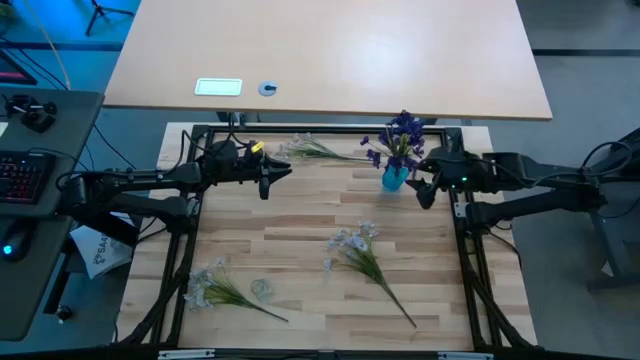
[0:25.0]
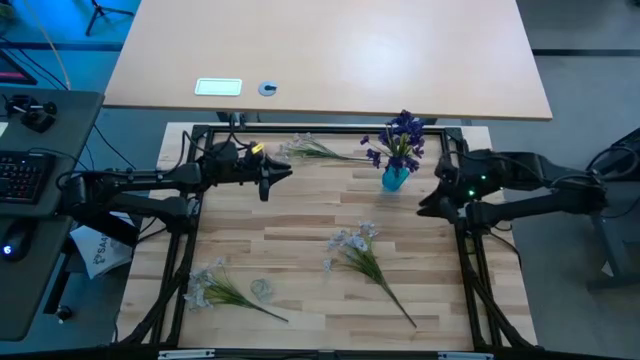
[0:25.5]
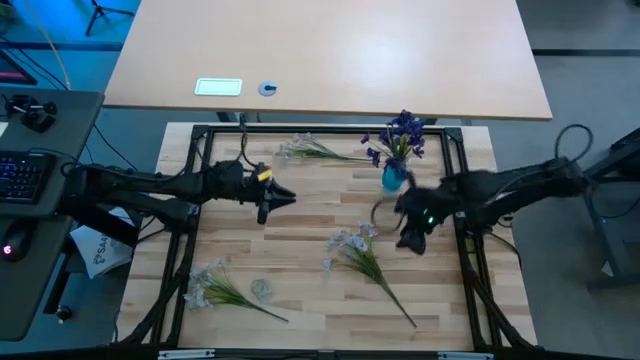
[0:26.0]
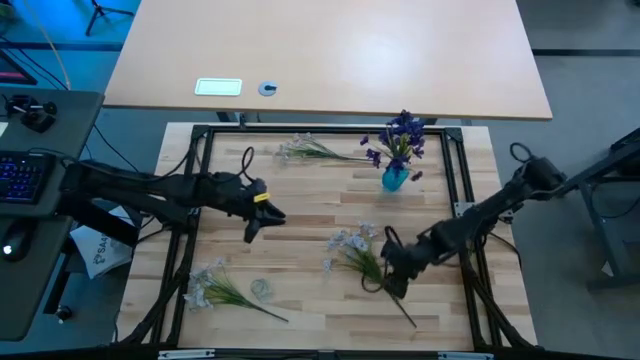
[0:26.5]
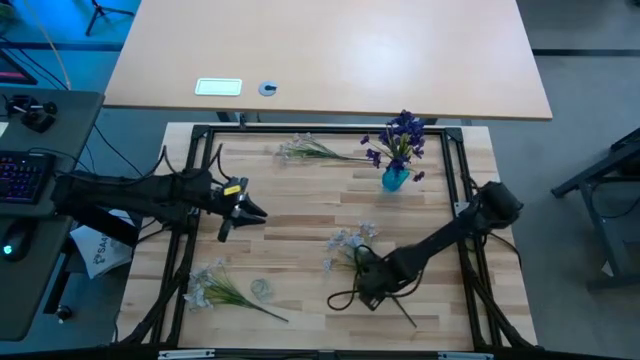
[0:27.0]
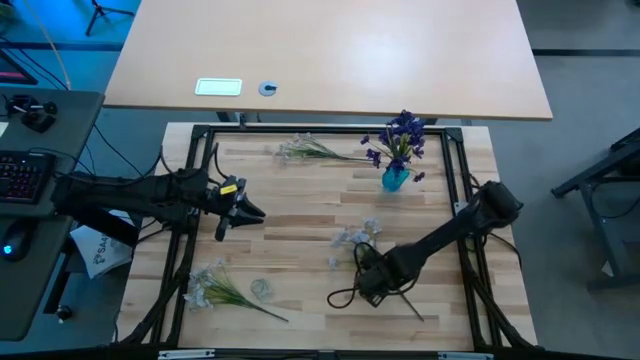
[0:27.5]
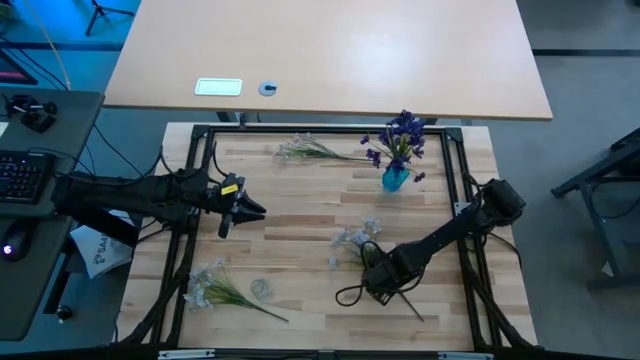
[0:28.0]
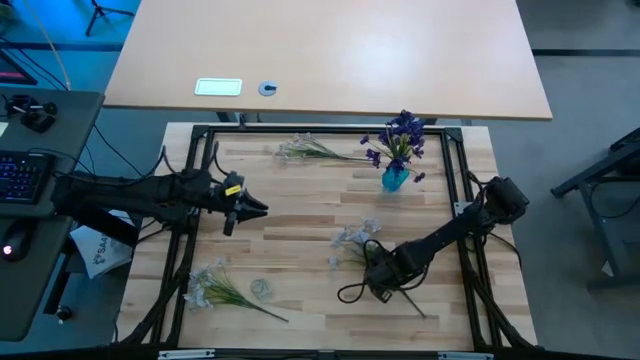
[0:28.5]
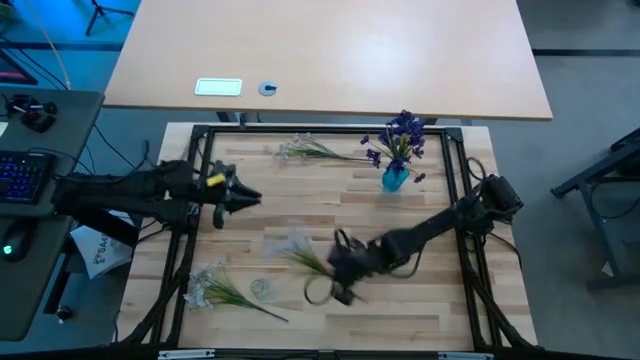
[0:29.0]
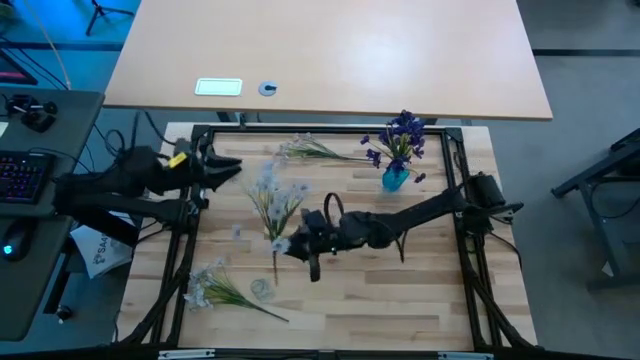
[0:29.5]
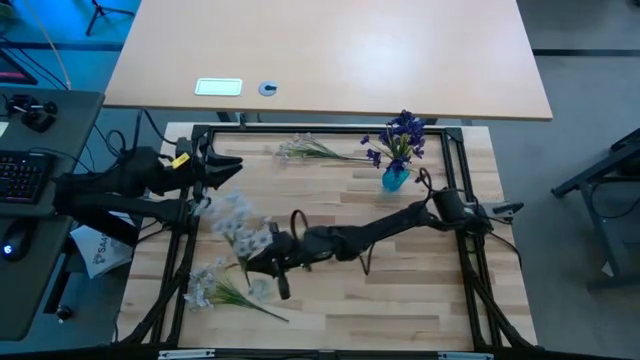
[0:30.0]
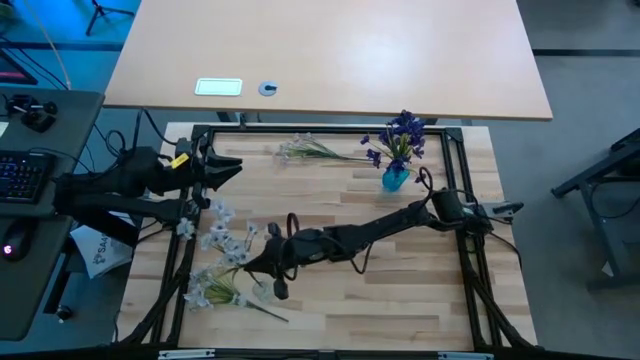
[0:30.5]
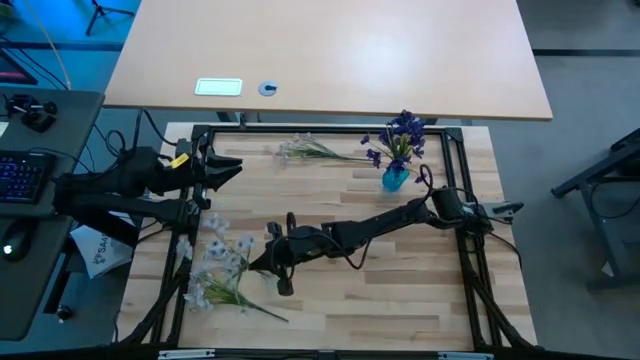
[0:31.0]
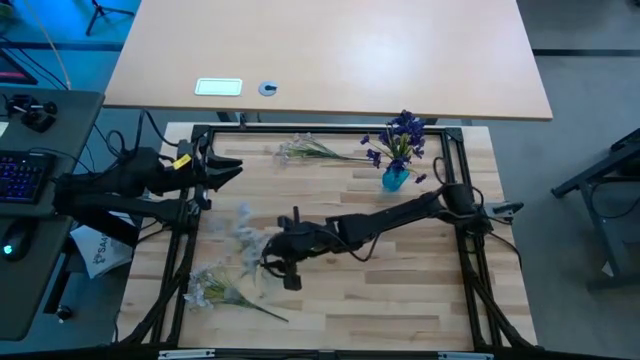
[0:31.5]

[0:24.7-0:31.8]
Task: Sort flowers into vase by color
Put the bottom right white flowers into the transparent vase

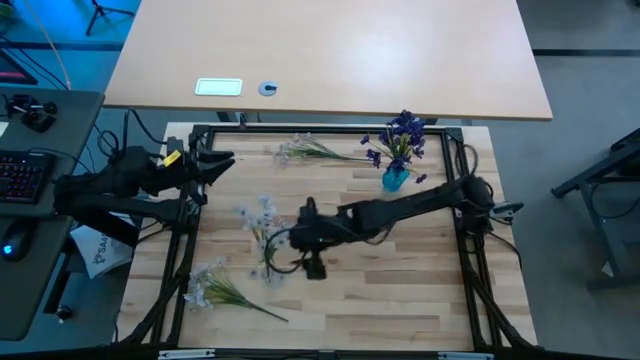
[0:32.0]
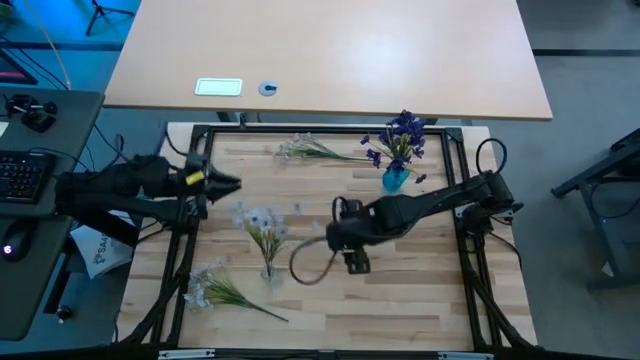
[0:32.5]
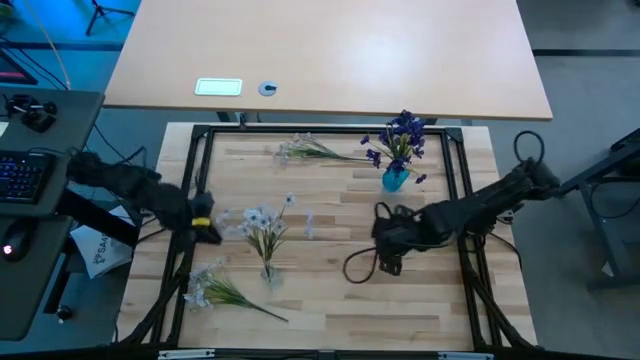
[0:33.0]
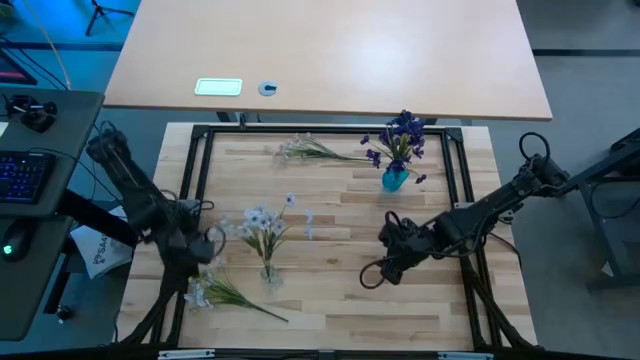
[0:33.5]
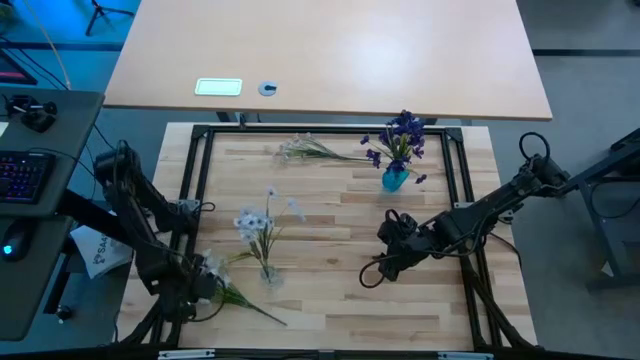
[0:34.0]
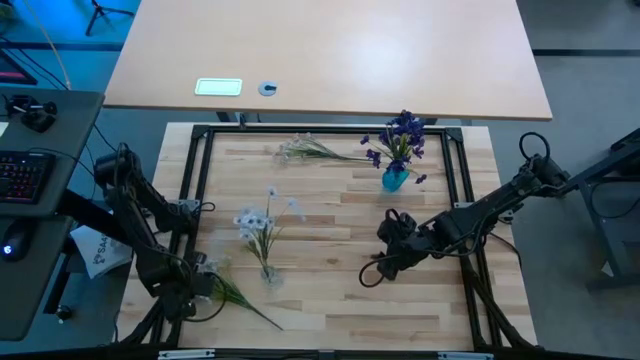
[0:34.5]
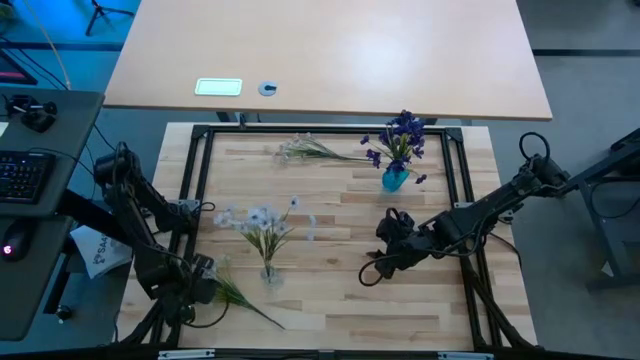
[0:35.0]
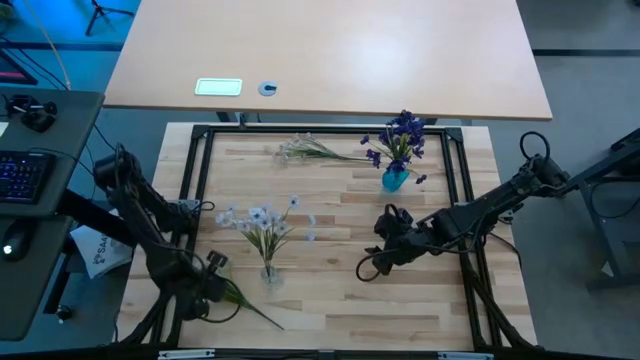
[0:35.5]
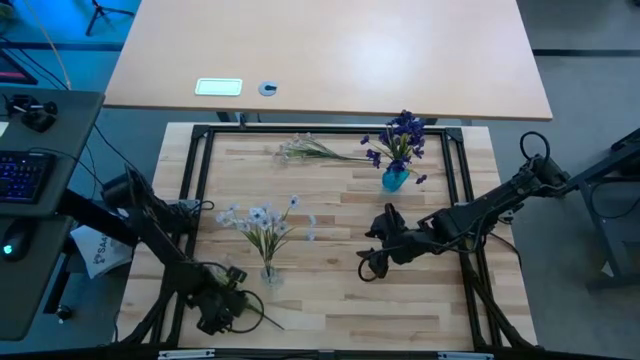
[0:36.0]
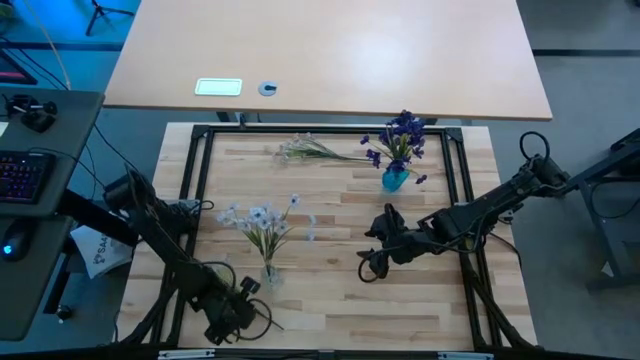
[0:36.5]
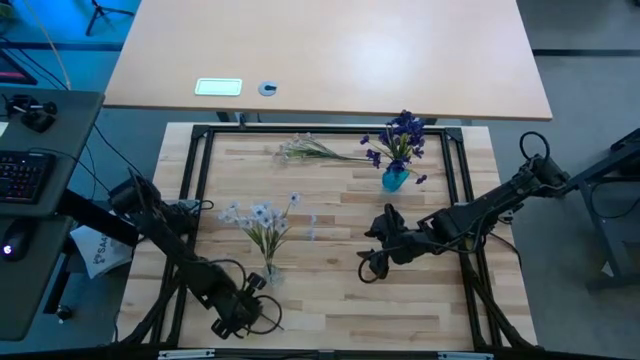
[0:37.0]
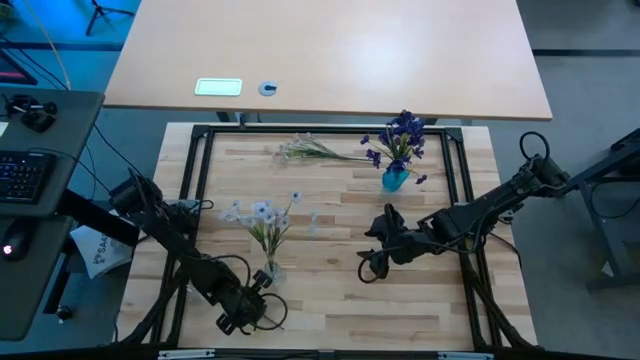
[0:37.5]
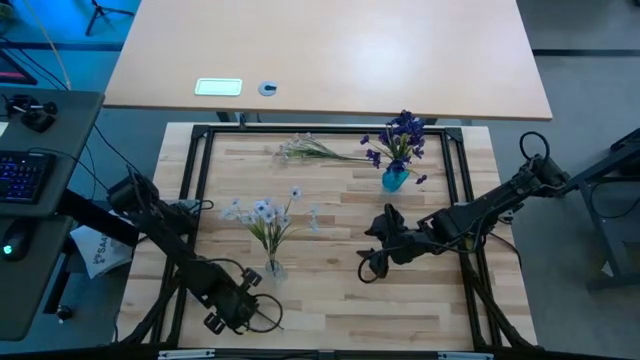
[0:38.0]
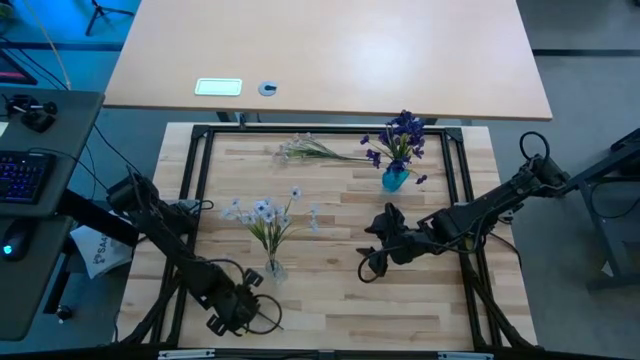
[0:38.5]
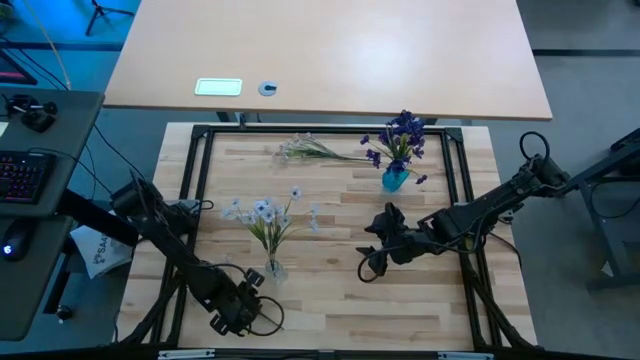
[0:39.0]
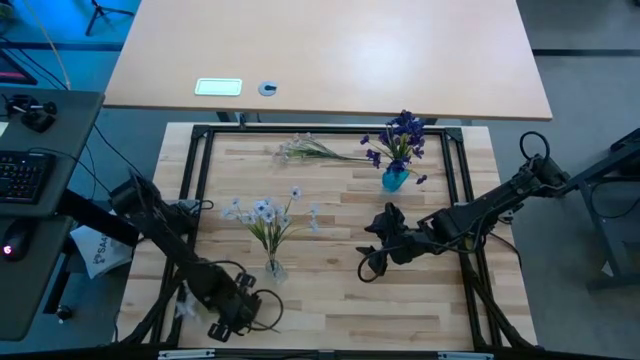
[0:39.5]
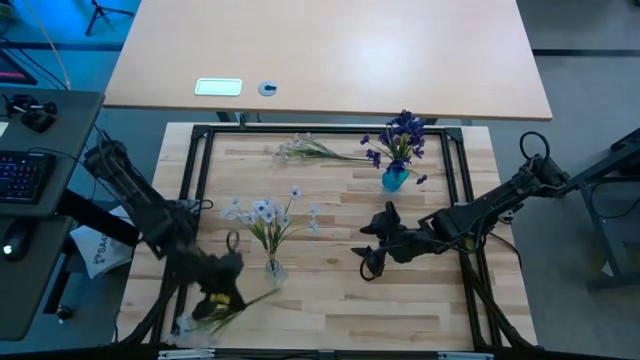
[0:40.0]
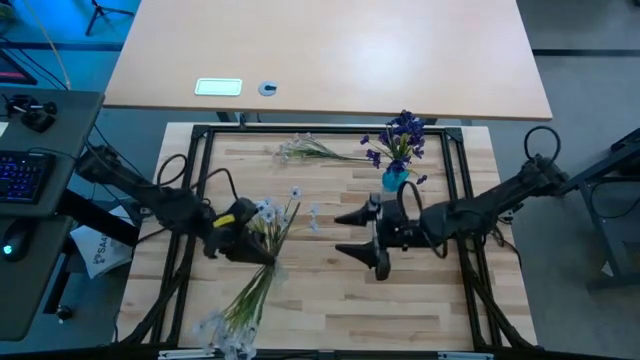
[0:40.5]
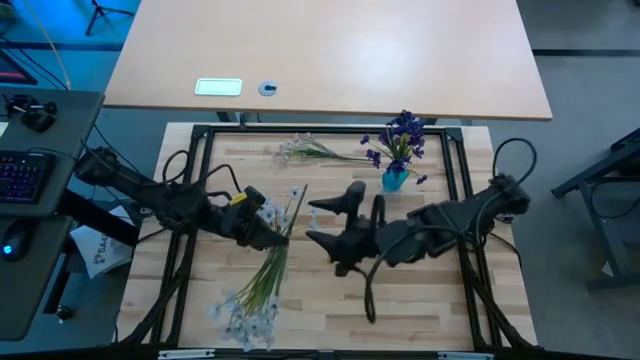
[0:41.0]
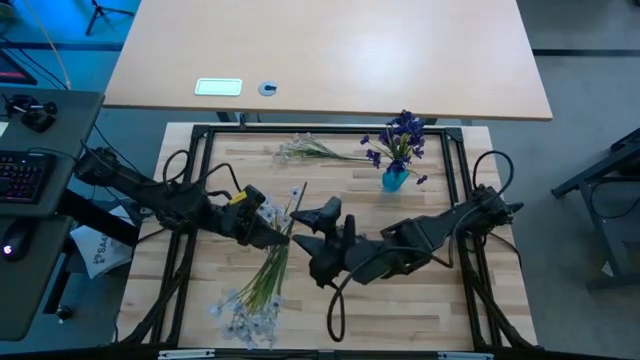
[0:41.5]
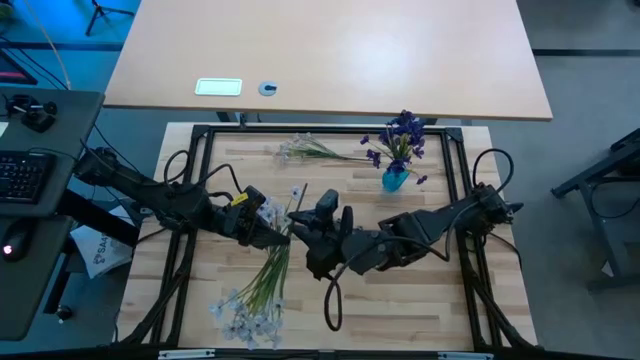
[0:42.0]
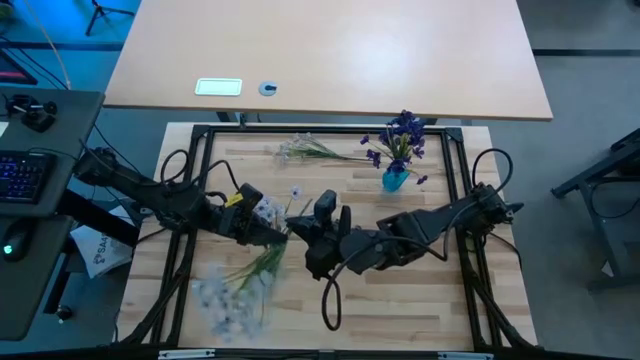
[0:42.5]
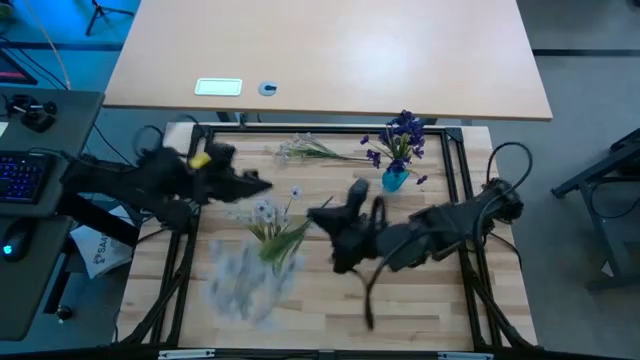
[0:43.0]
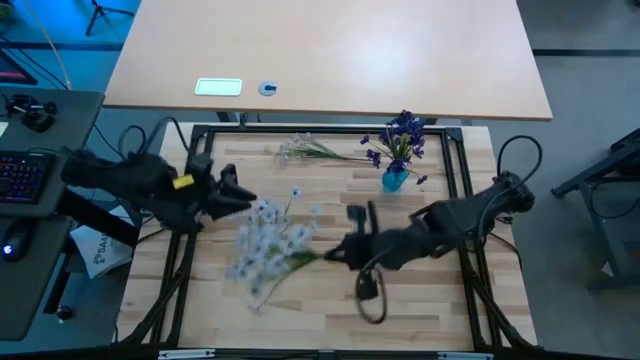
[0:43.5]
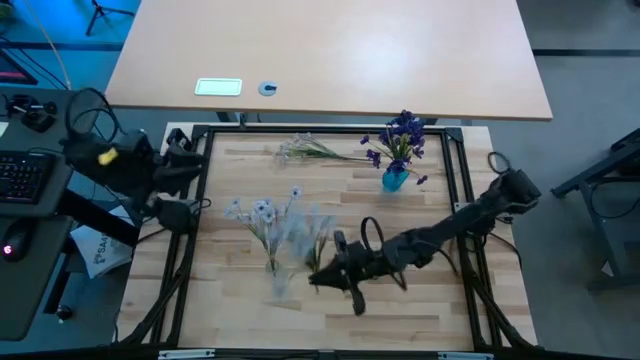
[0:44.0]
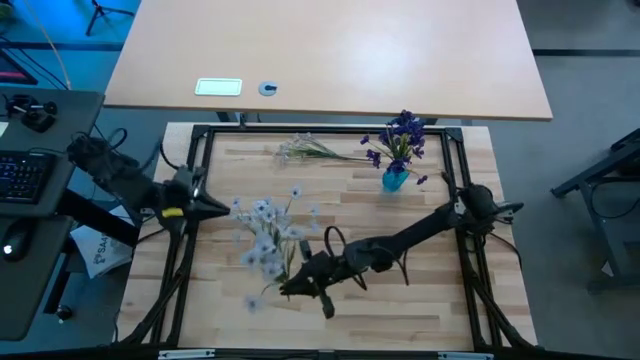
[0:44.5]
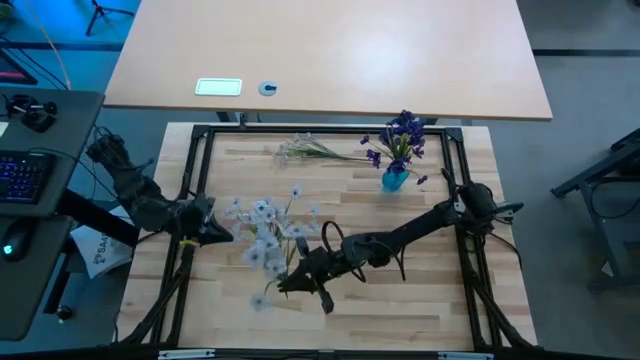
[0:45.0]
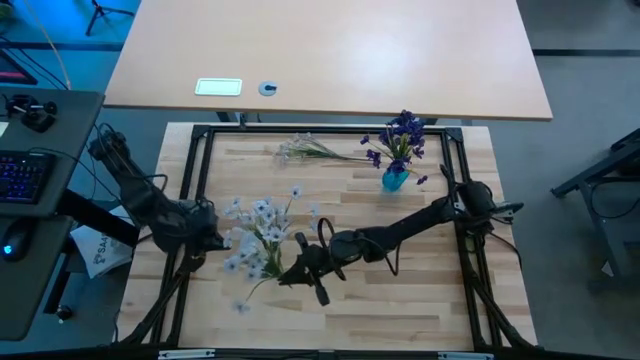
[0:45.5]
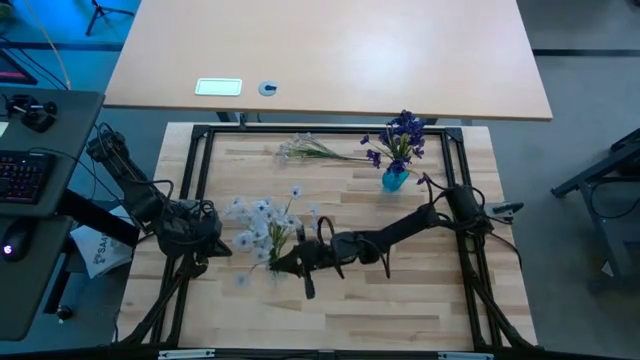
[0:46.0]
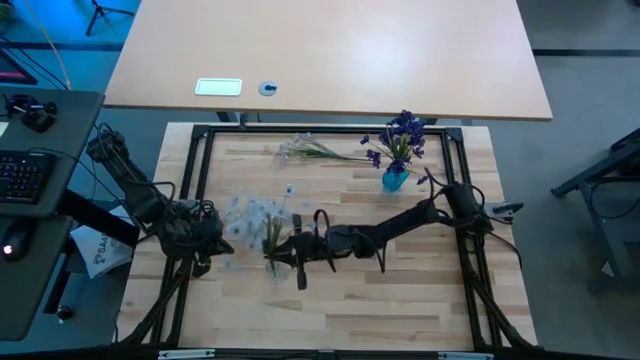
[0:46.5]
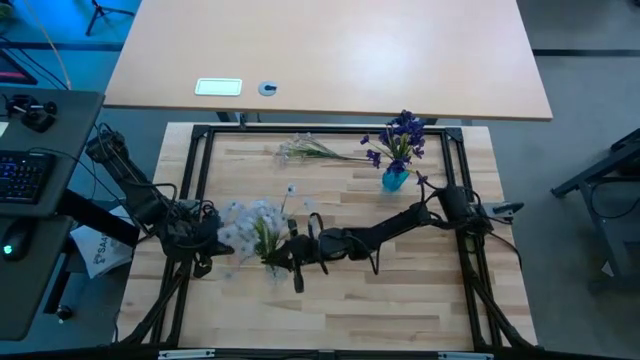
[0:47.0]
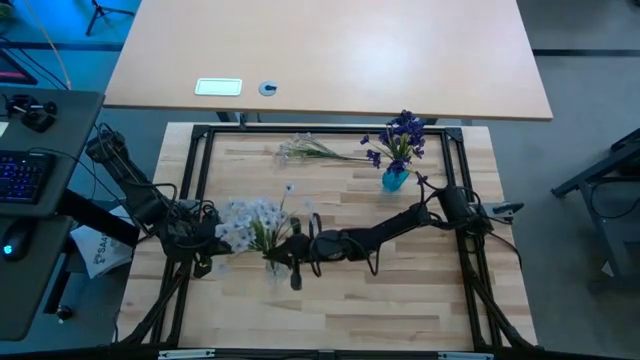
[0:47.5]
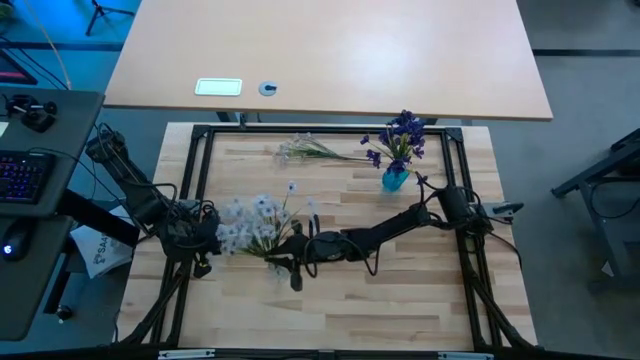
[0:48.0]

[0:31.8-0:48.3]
Put the bottom white flowers into the transparent vase
